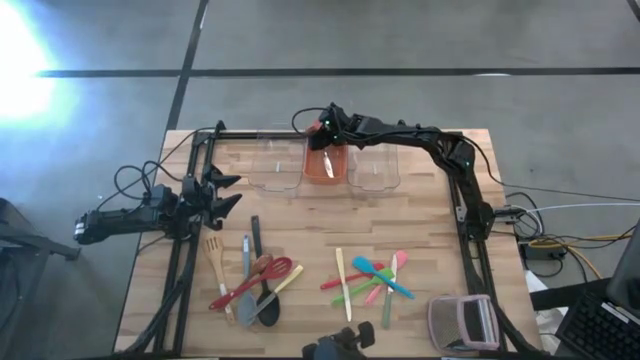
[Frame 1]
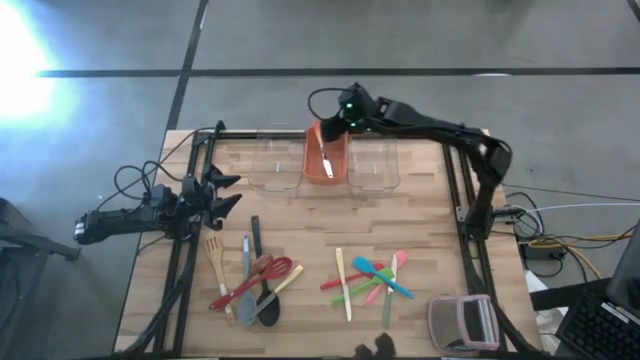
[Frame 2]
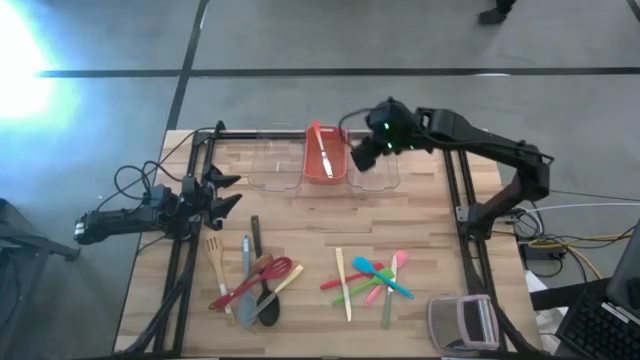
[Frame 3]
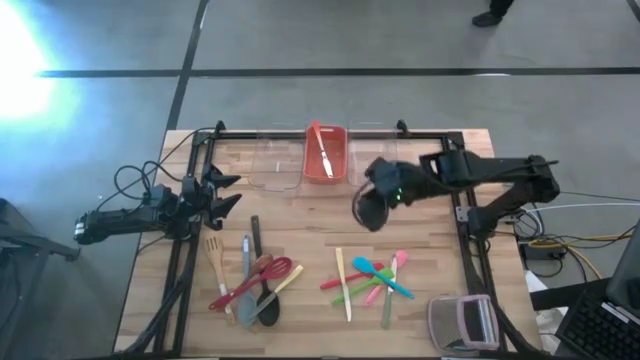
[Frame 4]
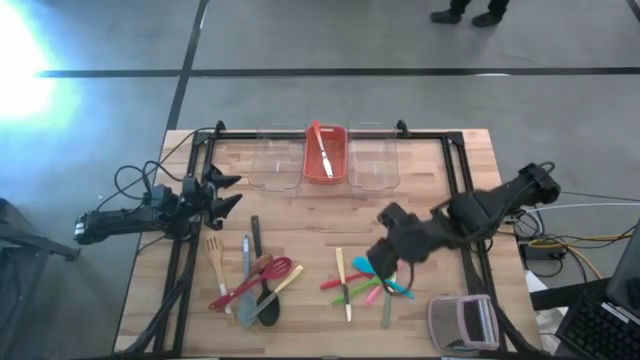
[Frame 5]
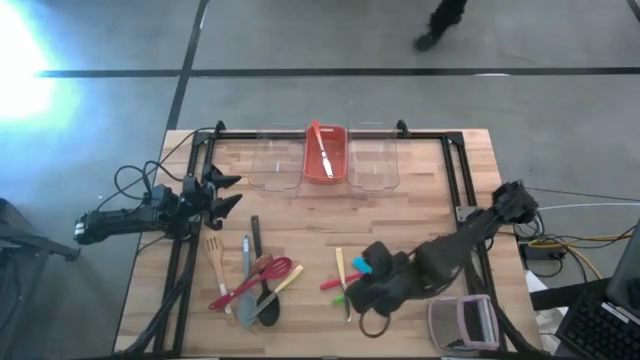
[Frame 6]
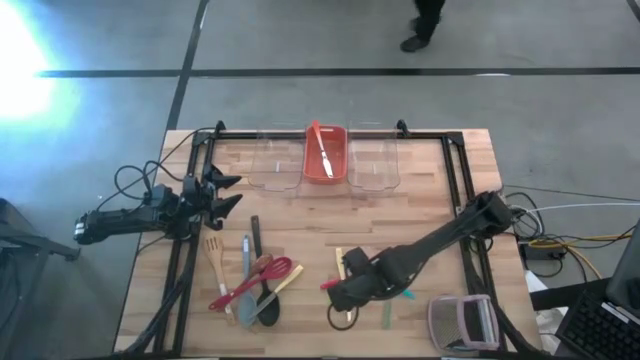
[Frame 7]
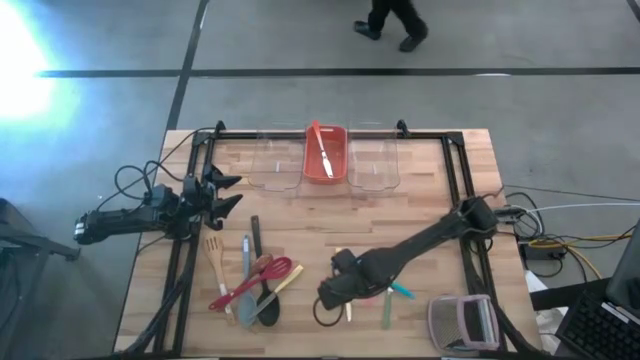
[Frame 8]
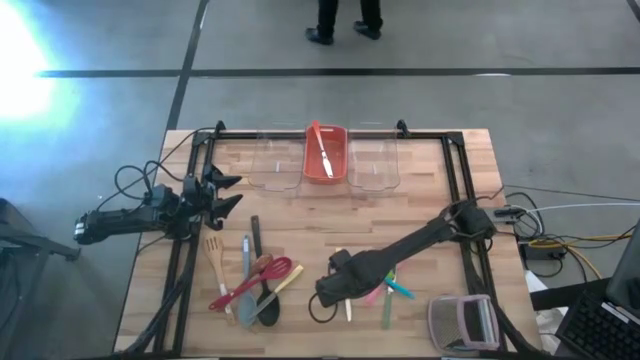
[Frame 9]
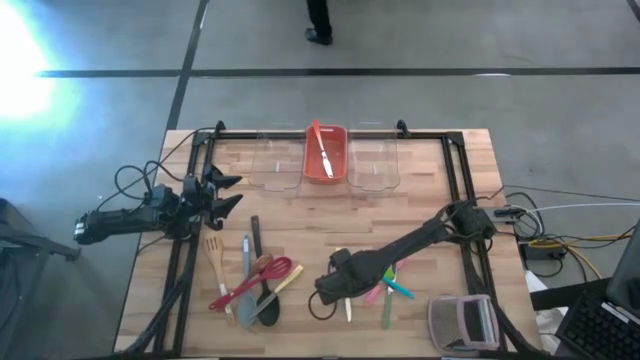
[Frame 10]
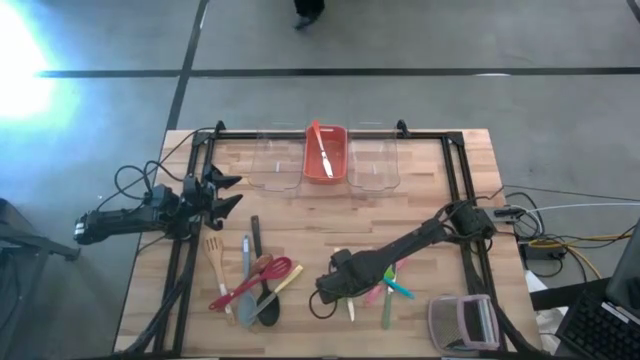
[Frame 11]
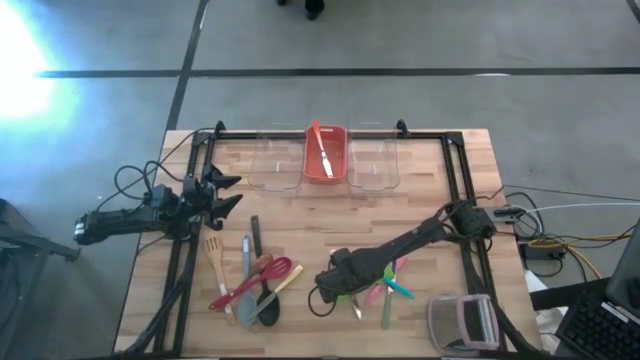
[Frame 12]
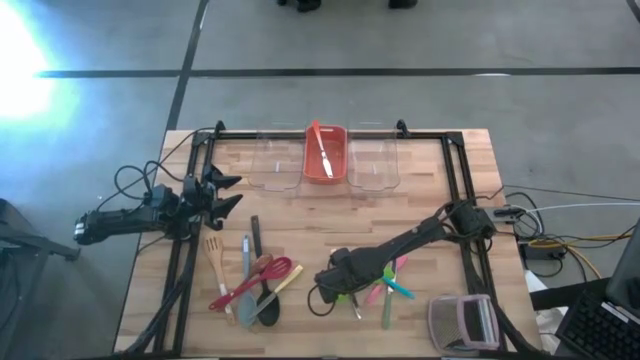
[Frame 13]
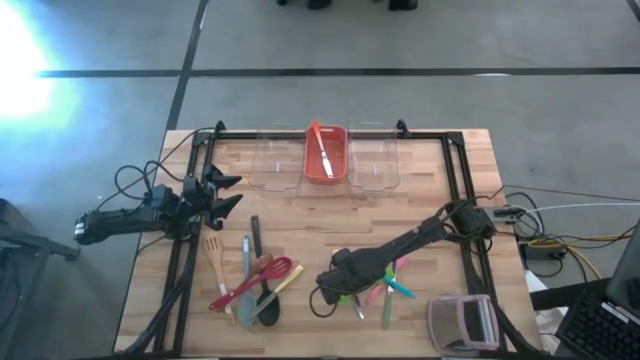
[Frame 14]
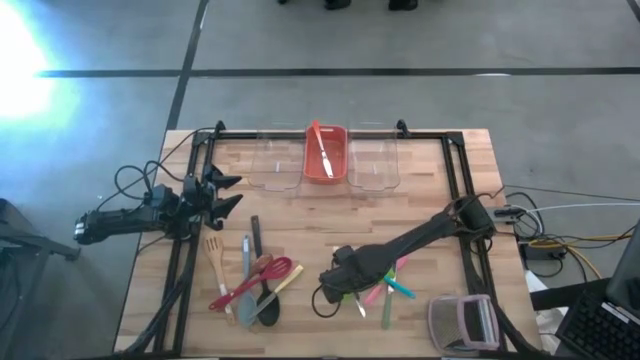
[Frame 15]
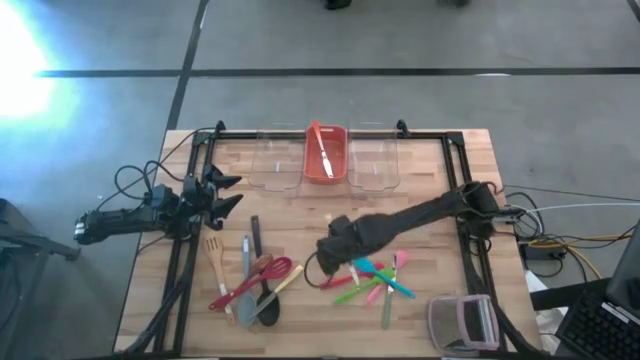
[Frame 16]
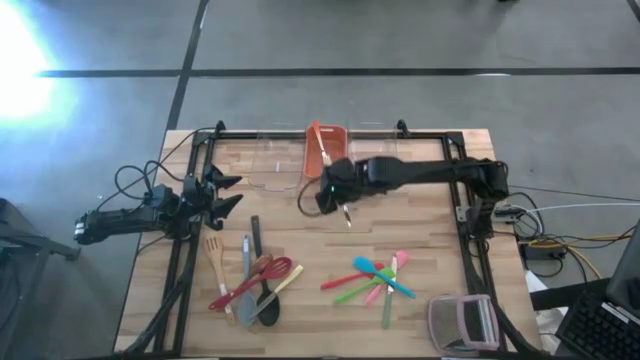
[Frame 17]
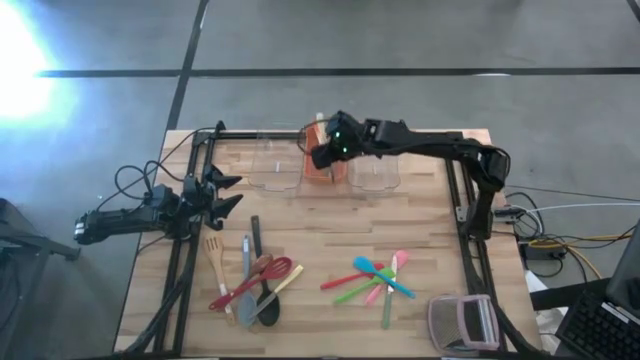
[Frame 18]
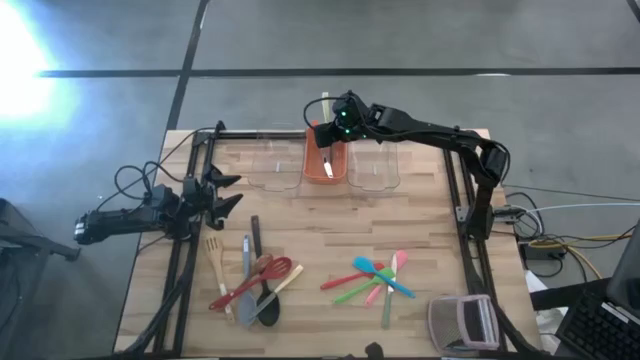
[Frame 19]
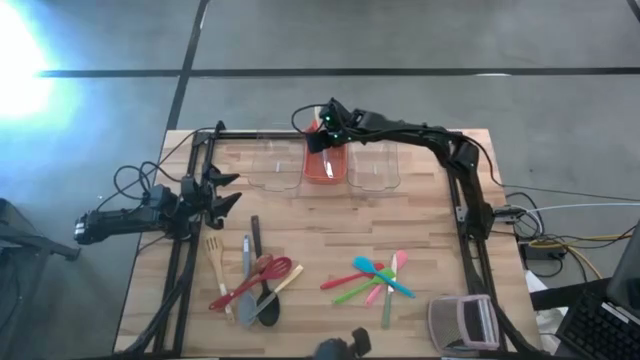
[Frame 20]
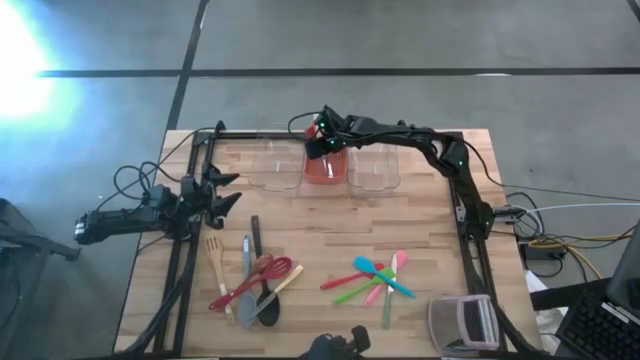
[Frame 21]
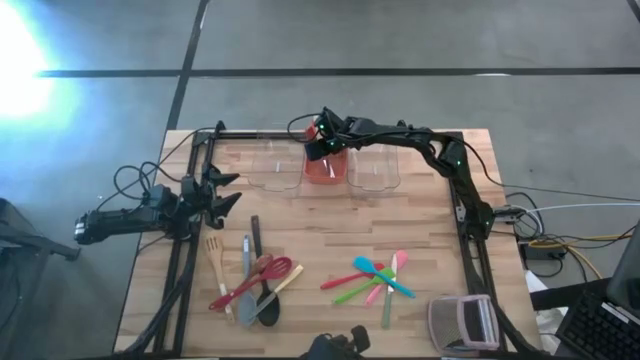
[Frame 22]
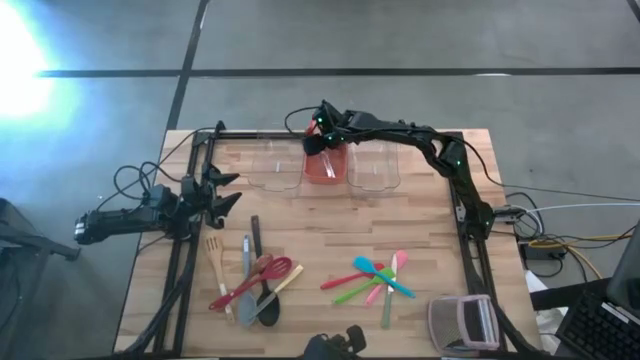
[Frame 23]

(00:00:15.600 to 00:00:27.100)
Task: Pick & Place Kitchen Items
Put the right yellow table knife into the orange bin

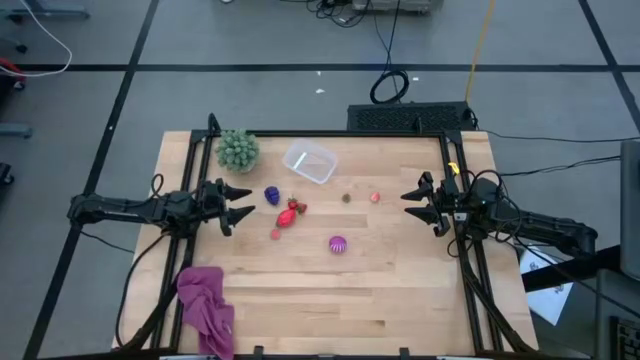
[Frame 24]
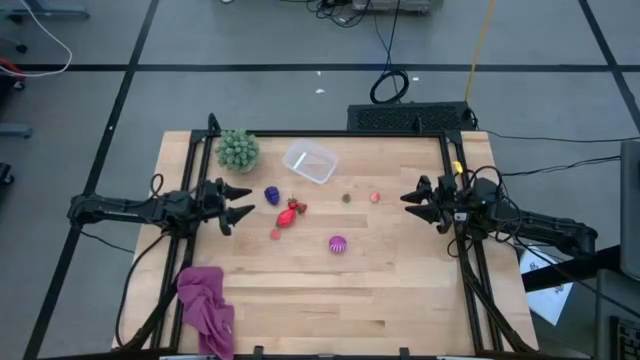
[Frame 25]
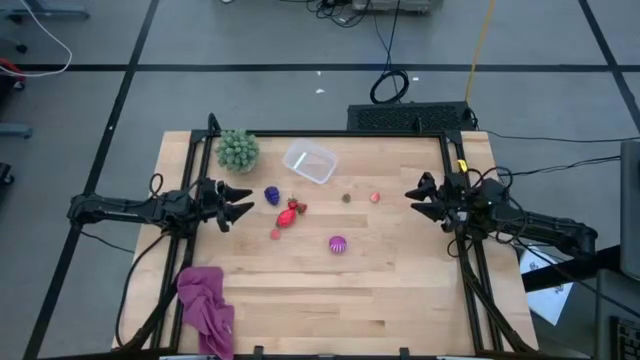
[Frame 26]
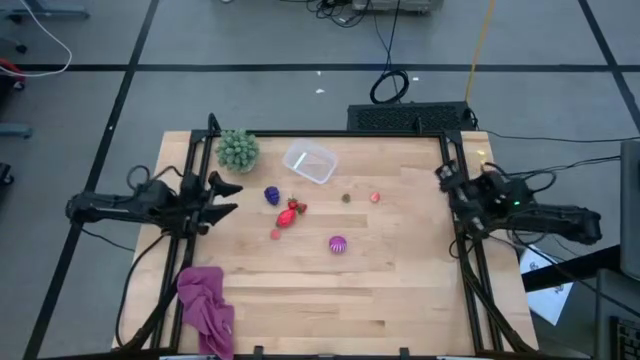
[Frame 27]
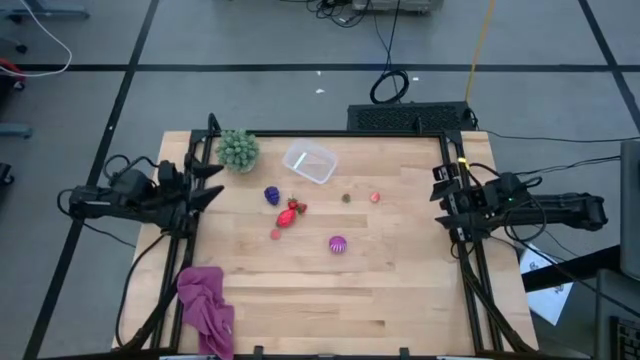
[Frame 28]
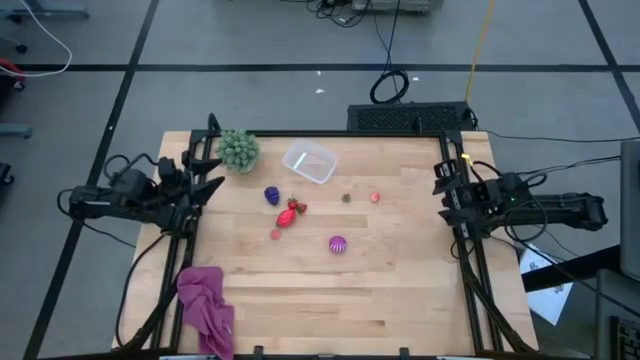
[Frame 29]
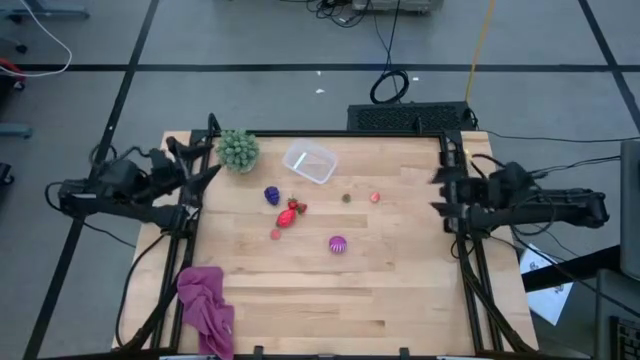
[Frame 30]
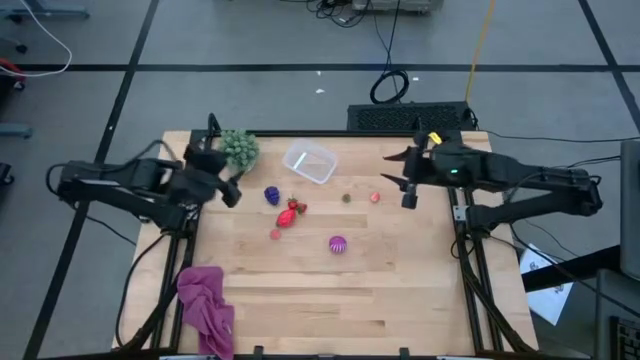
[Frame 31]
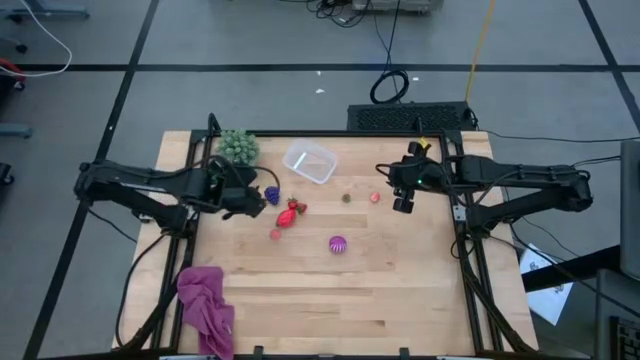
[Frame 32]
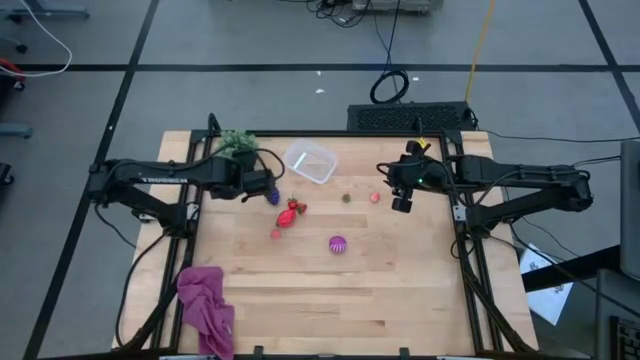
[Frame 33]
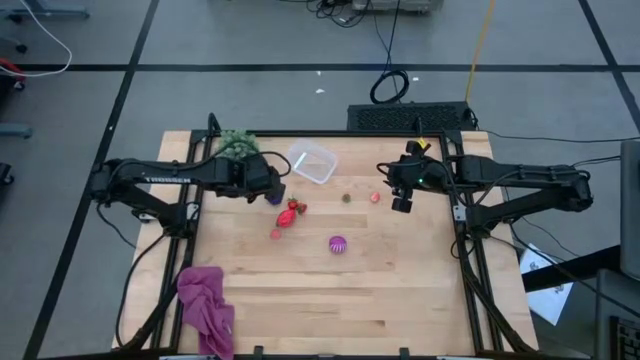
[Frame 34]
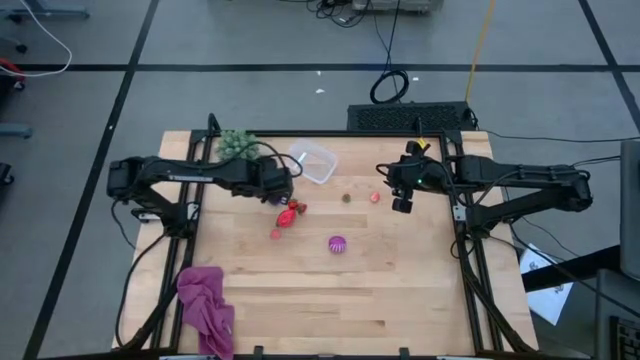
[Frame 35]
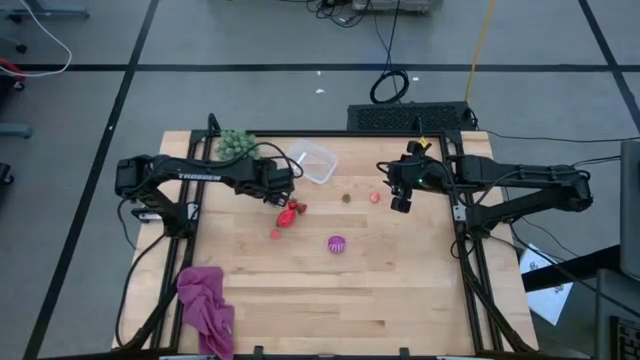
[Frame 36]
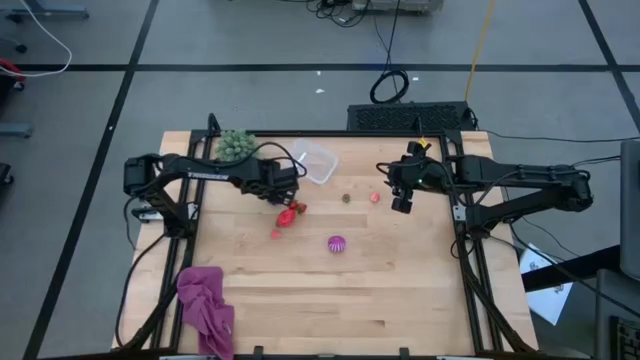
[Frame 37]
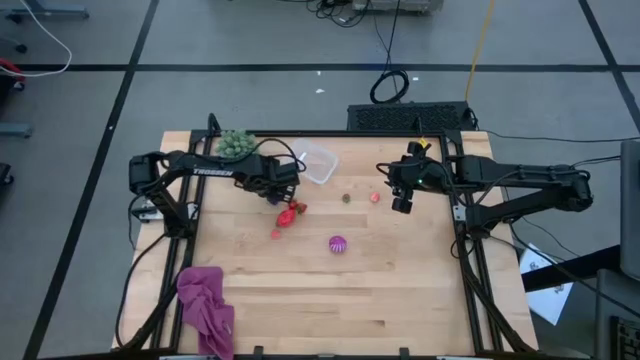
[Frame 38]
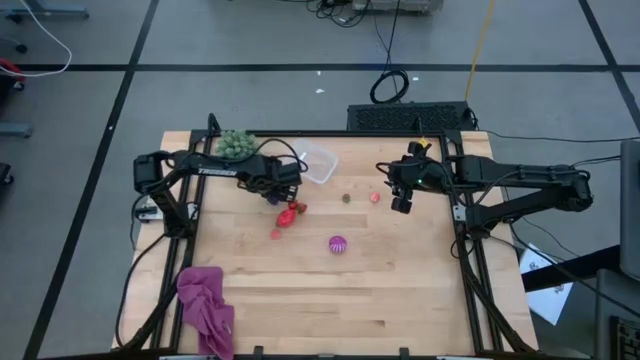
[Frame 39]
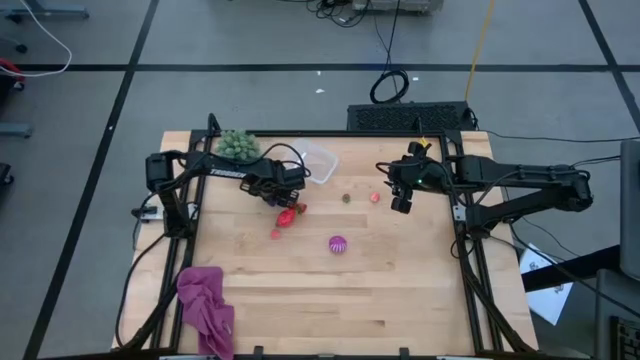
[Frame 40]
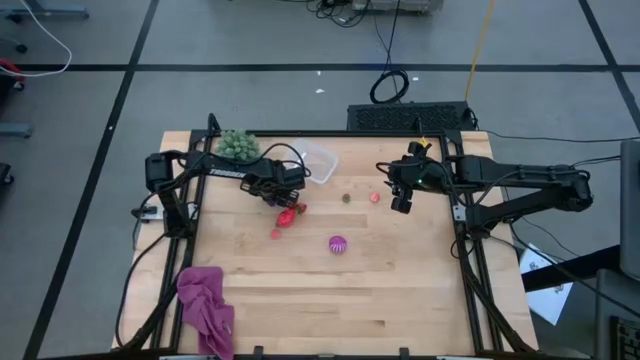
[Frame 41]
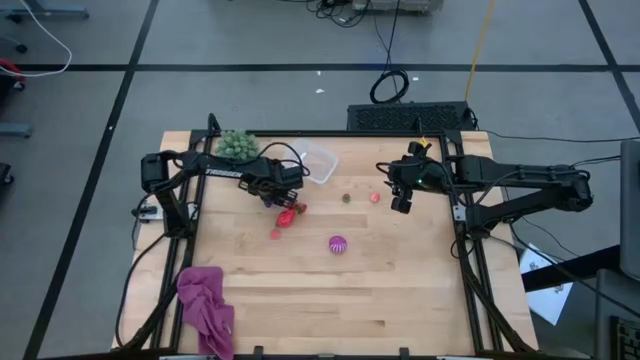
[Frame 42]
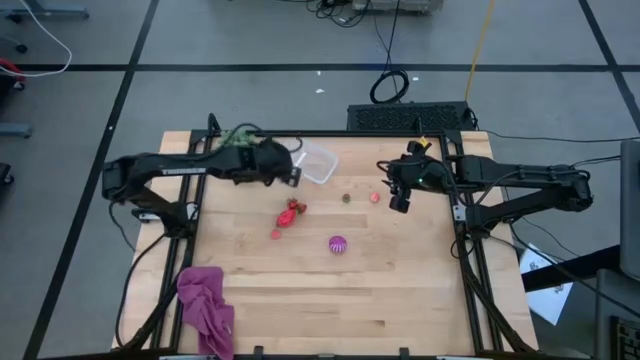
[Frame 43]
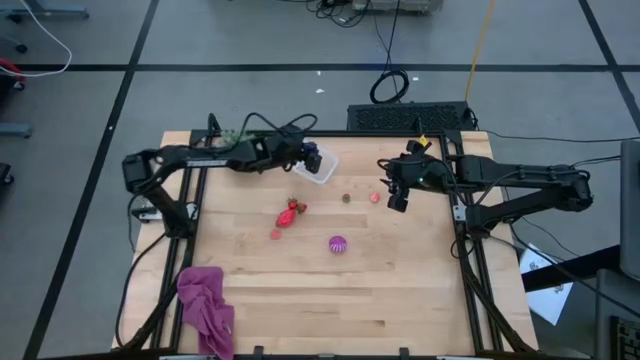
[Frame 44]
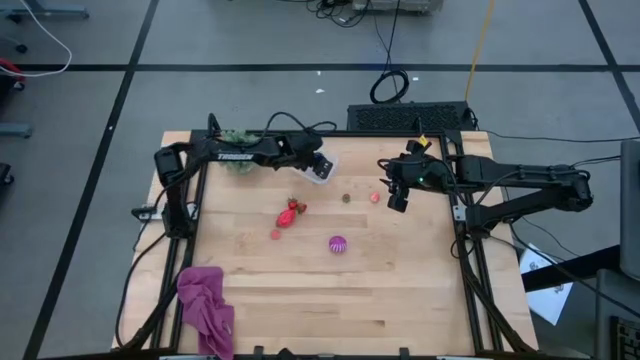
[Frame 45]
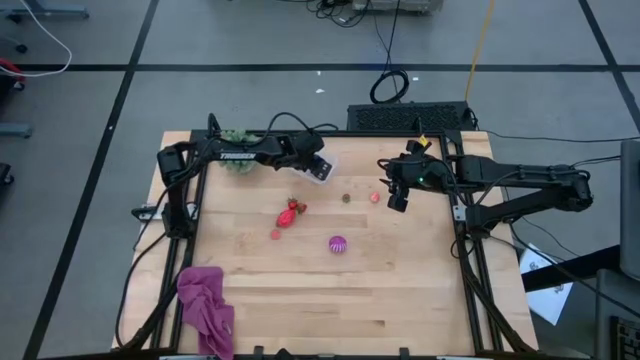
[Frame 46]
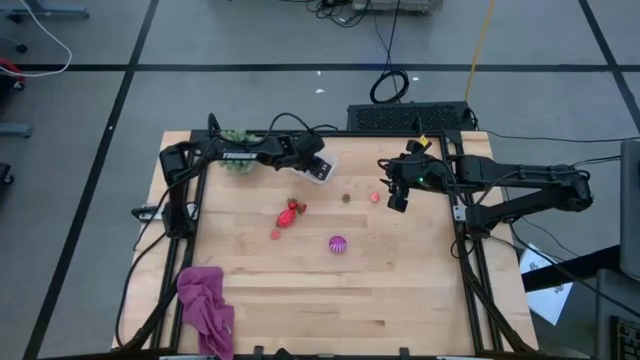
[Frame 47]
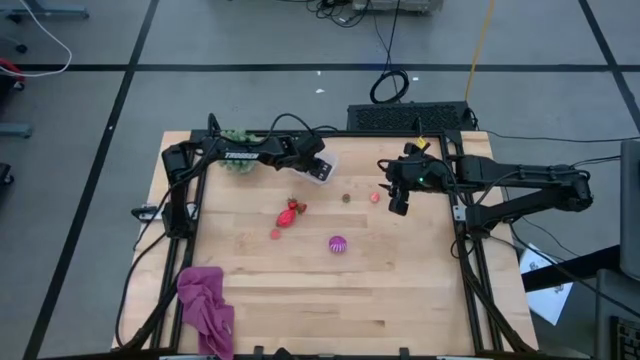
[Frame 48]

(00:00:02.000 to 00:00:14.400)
Task: Pick and placing Produce into tupperware
Put the purple grape into the transparent bin
